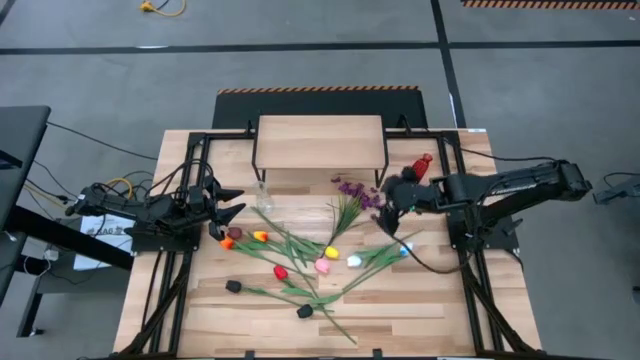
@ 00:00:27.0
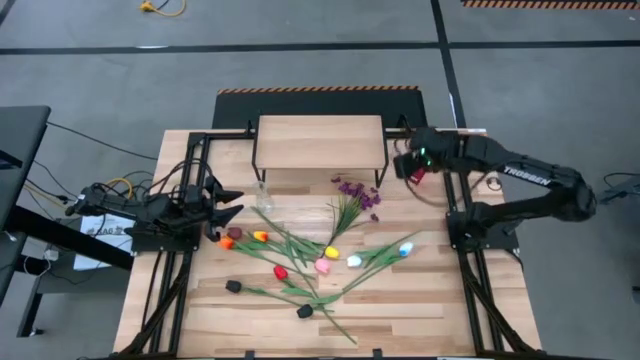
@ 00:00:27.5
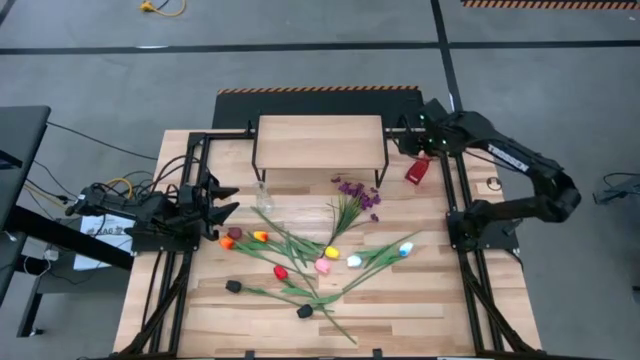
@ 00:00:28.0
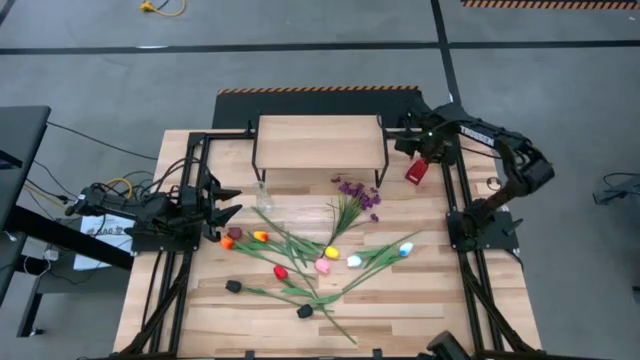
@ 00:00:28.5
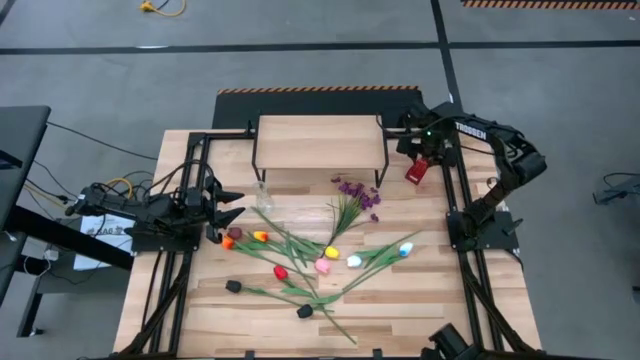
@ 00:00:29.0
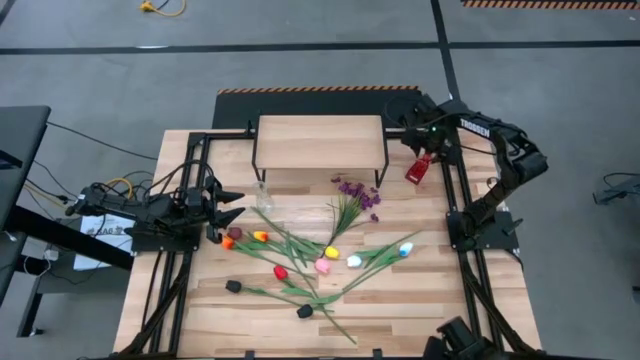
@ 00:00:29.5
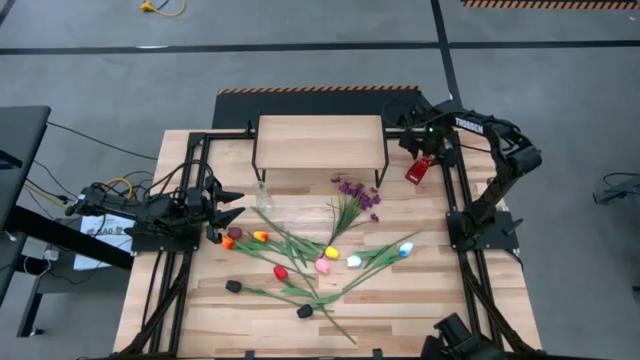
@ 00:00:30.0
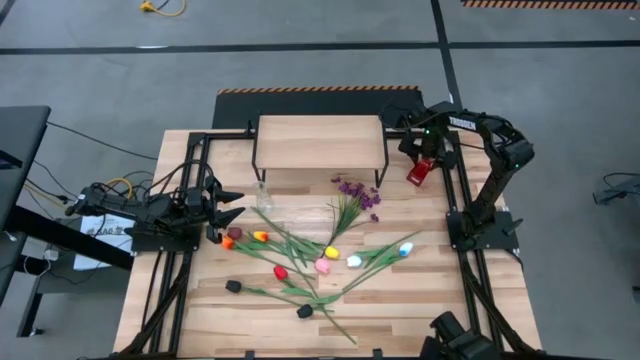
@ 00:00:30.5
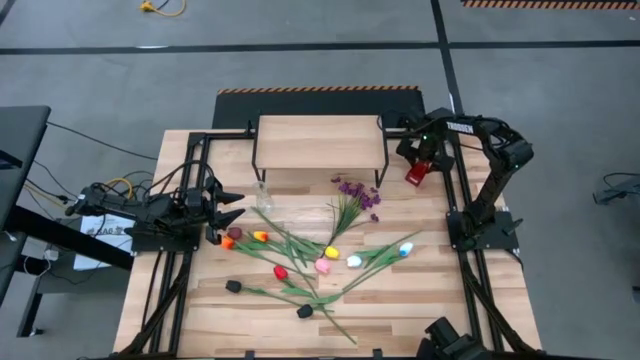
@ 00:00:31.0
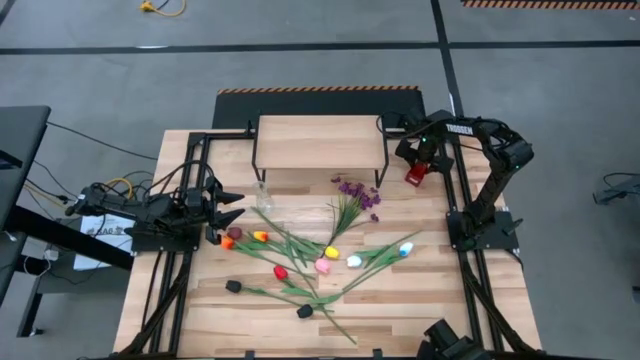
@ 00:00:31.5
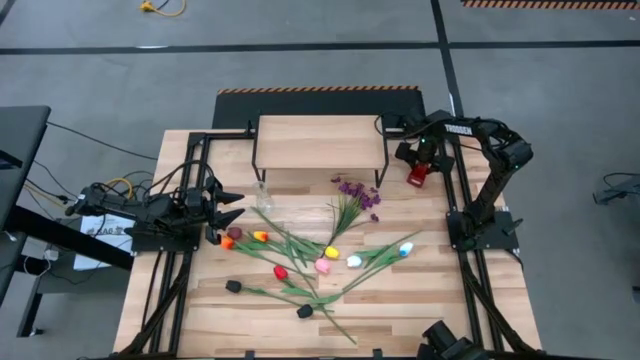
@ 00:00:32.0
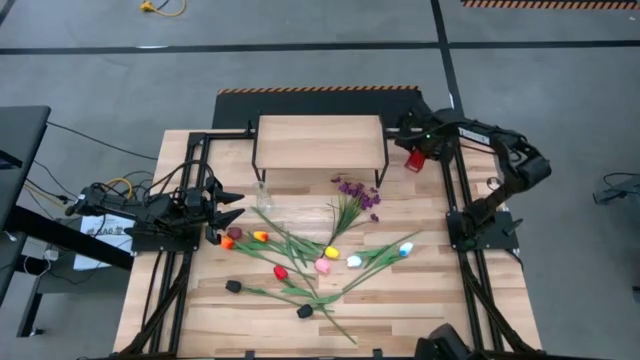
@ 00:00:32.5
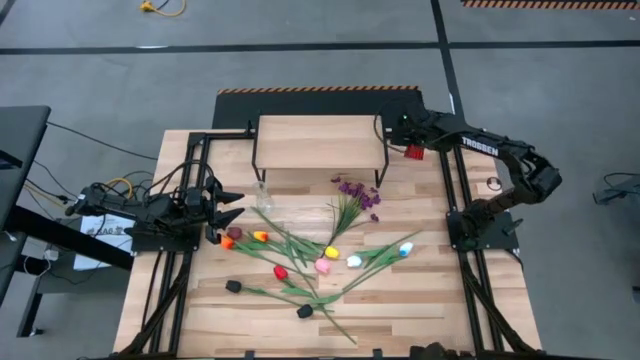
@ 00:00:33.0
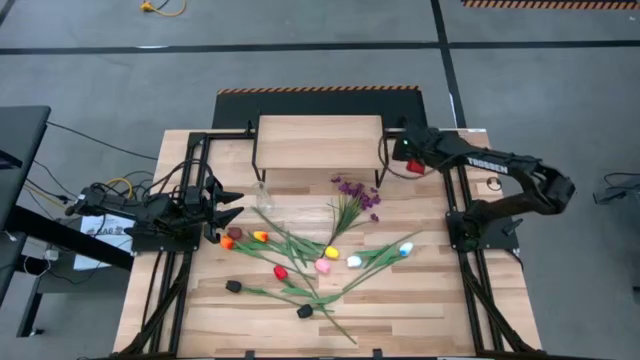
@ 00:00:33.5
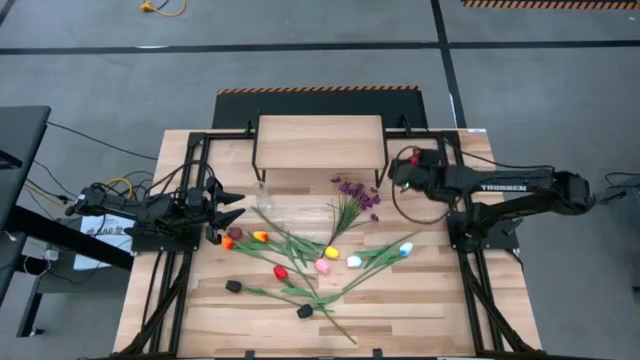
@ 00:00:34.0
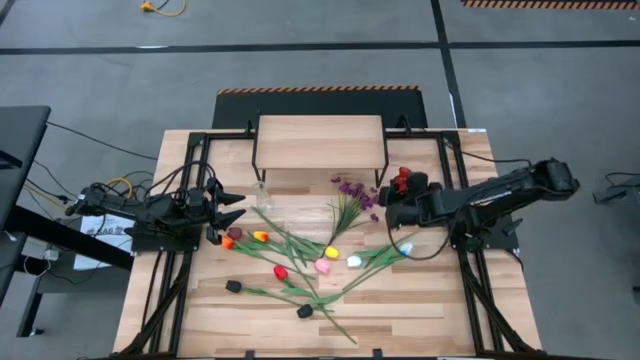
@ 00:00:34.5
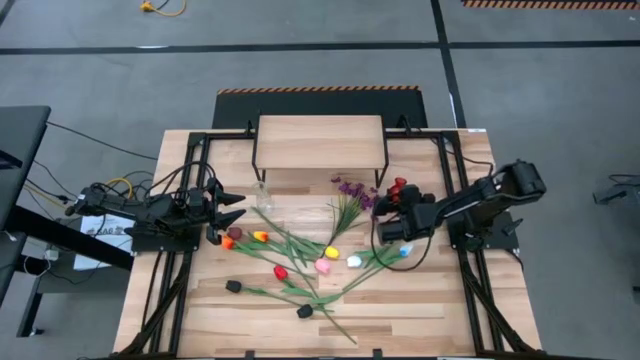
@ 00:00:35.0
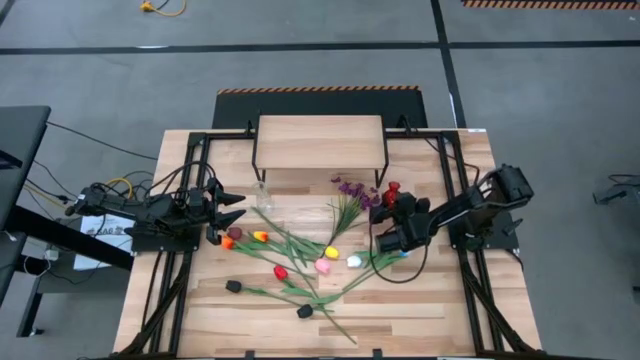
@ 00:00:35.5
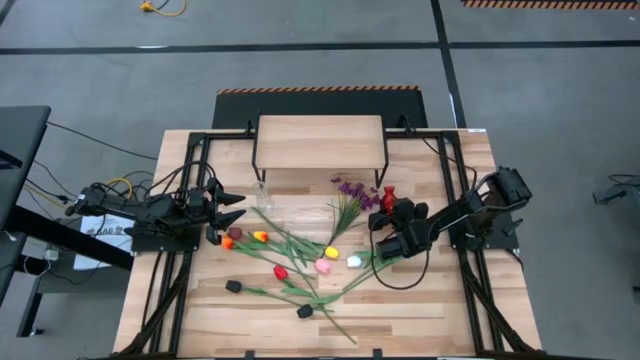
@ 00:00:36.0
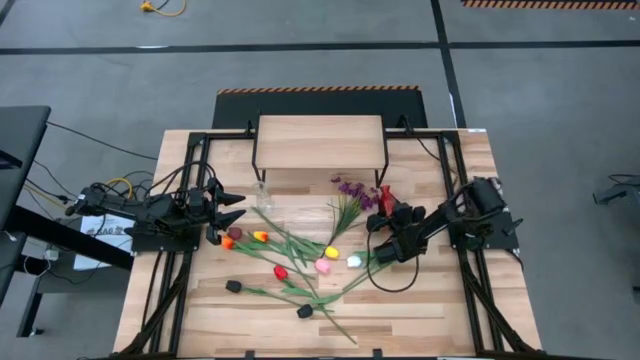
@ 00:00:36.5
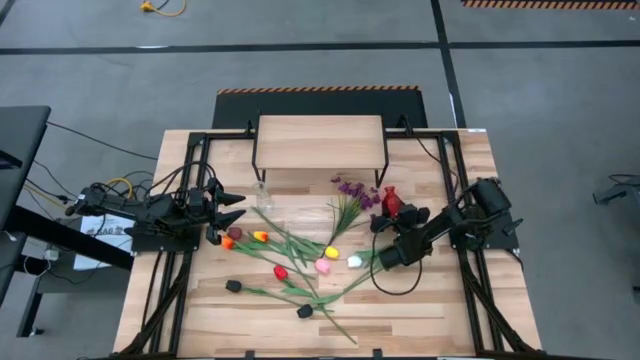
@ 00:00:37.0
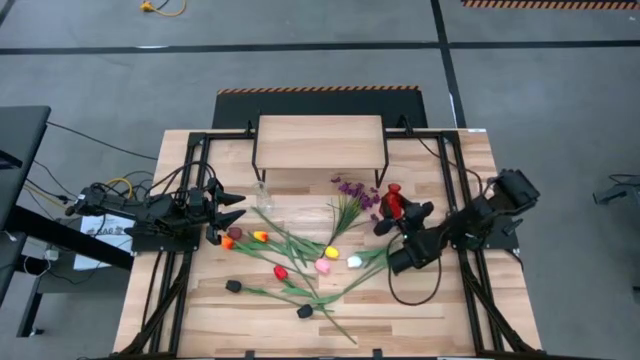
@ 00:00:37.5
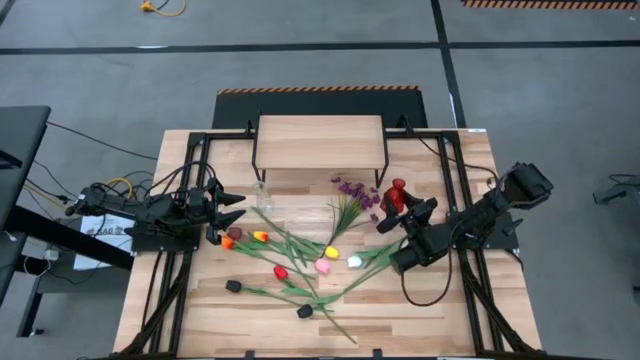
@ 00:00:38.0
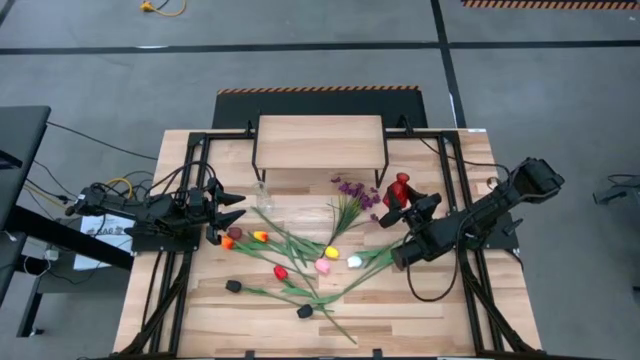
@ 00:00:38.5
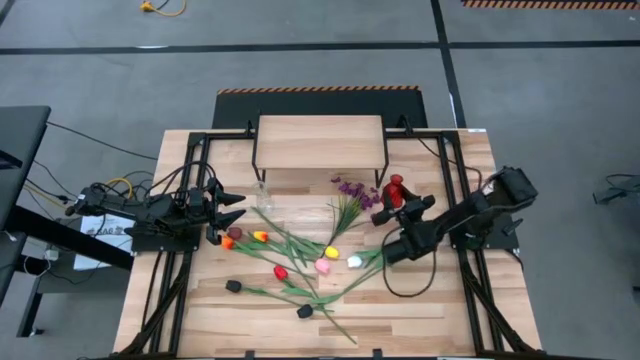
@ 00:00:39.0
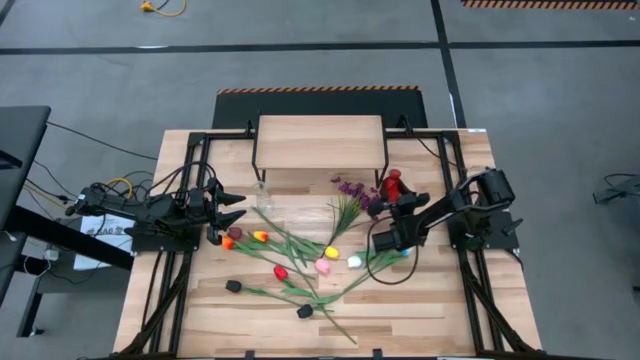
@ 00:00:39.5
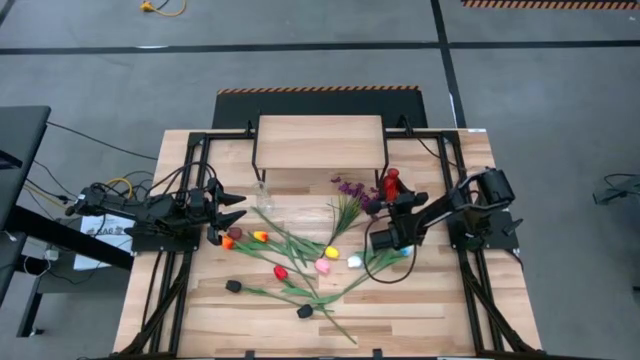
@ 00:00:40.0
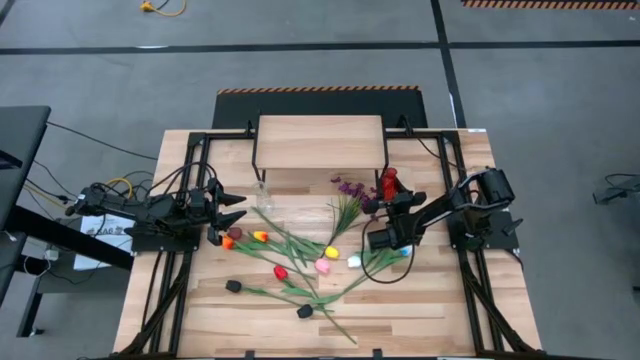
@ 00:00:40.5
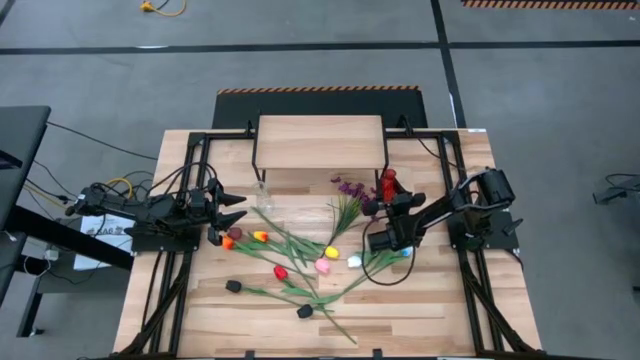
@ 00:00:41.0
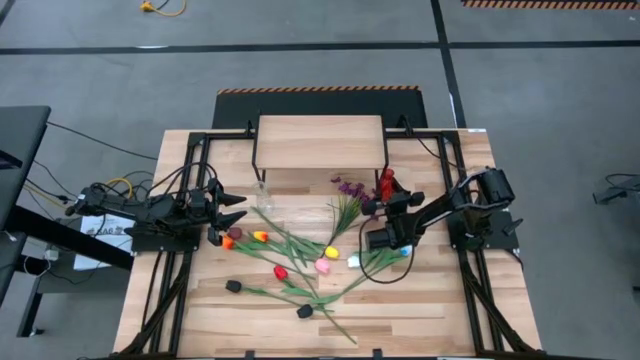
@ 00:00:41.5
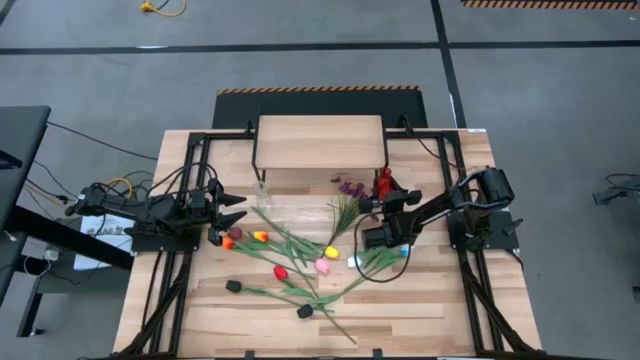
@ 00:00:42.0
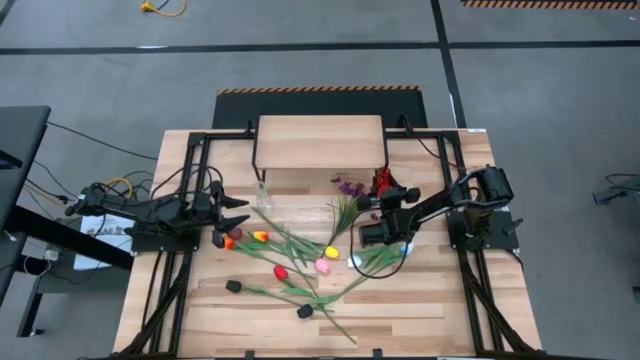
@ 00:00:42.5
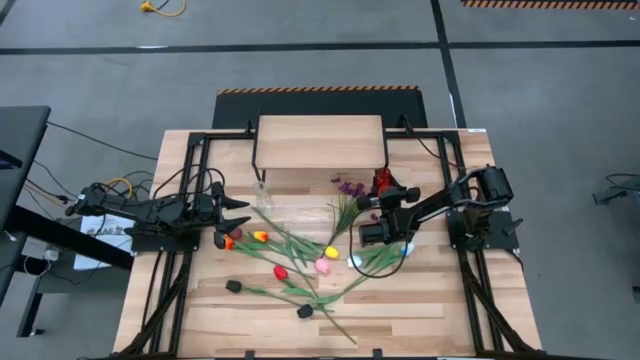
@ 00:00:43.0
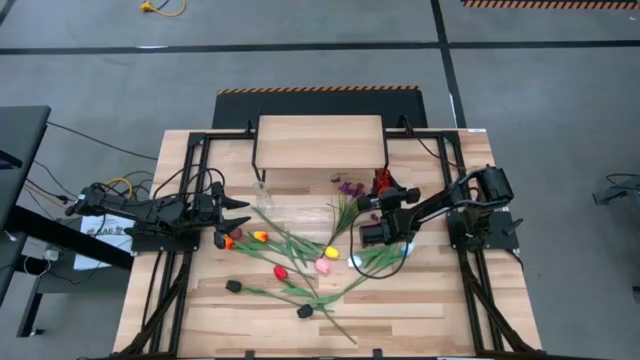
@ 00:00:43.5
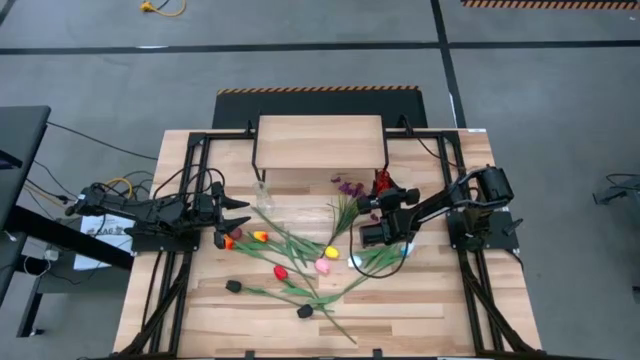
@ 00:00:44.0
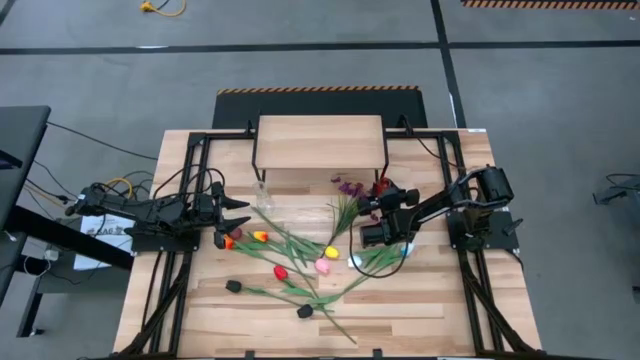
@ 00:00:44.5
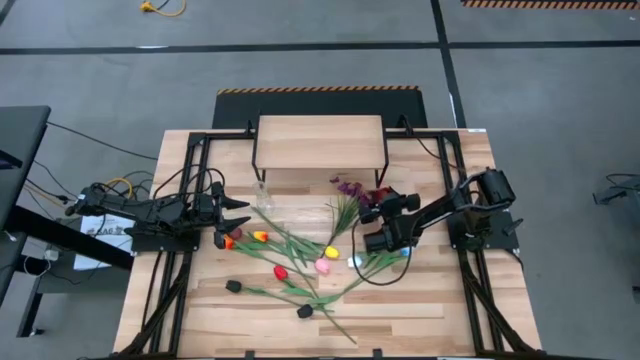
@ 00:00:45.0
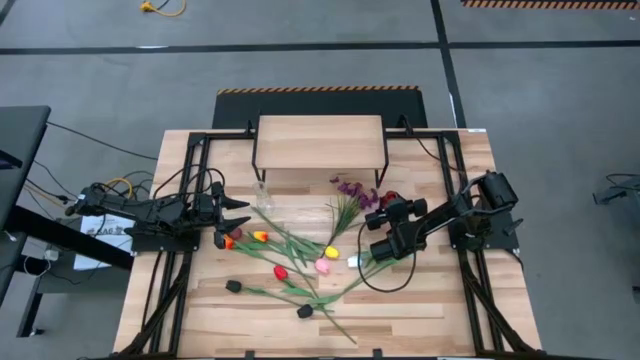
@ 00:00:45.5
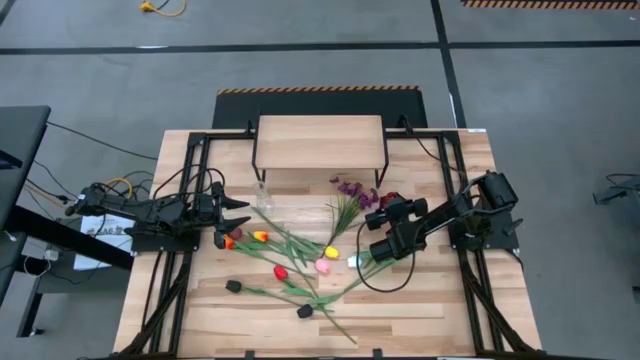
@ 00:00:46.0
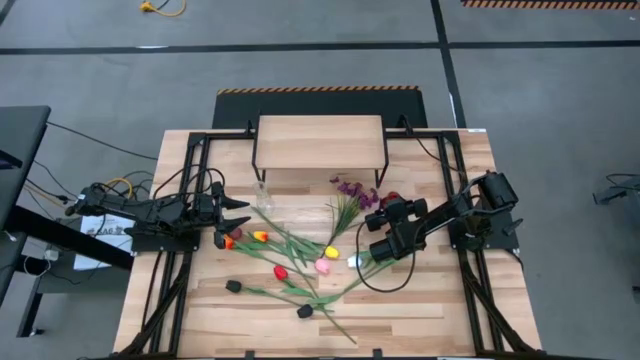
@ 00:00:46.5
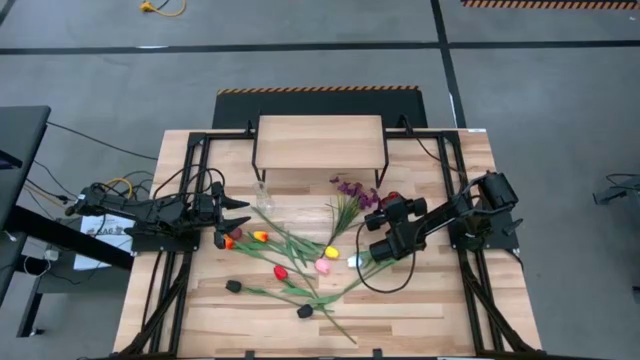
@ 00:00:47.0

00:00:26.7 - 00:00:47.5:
Task: Pick and place flowers into a vace then onto a shelf
Adjust the red vase
